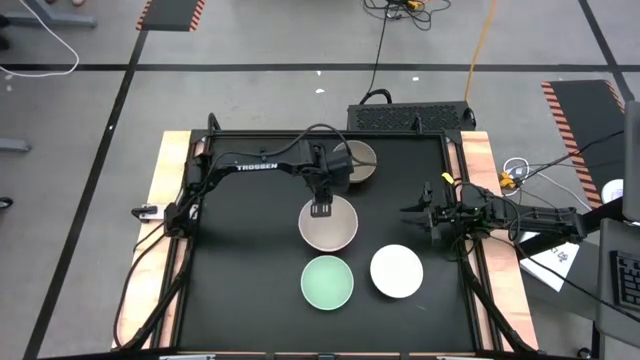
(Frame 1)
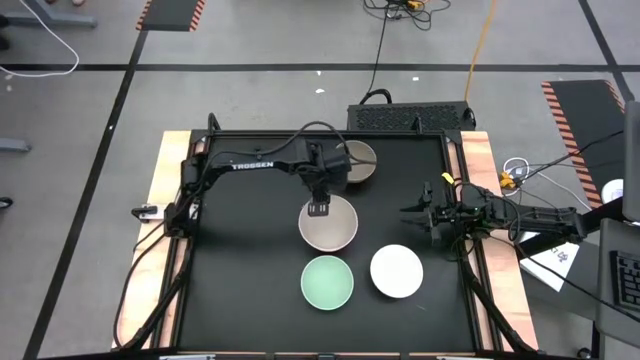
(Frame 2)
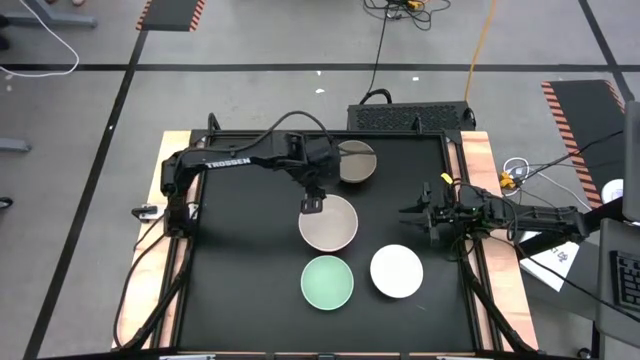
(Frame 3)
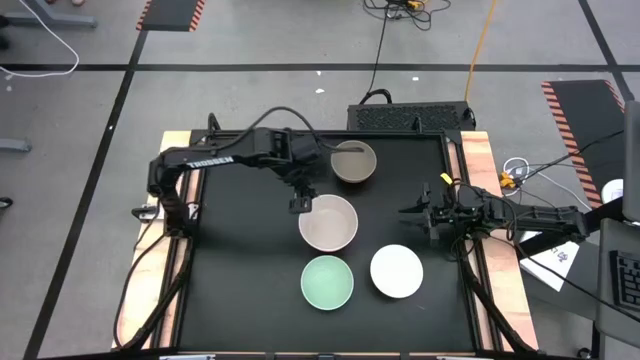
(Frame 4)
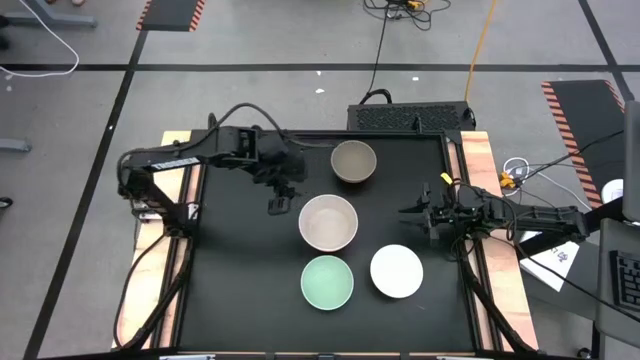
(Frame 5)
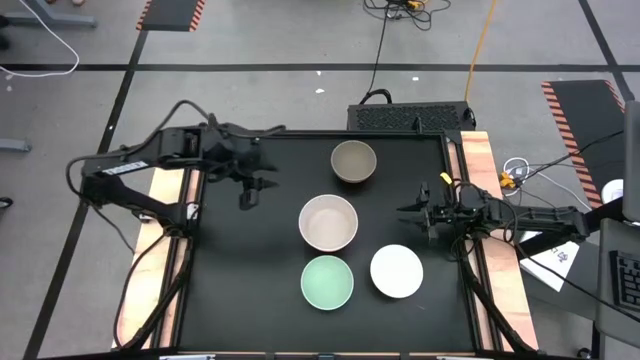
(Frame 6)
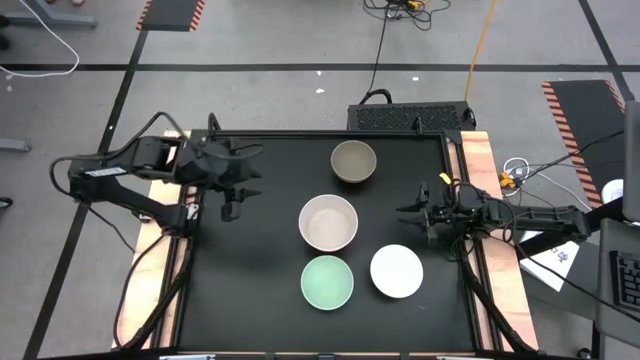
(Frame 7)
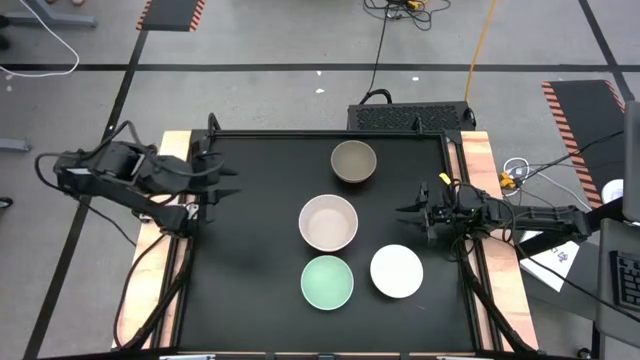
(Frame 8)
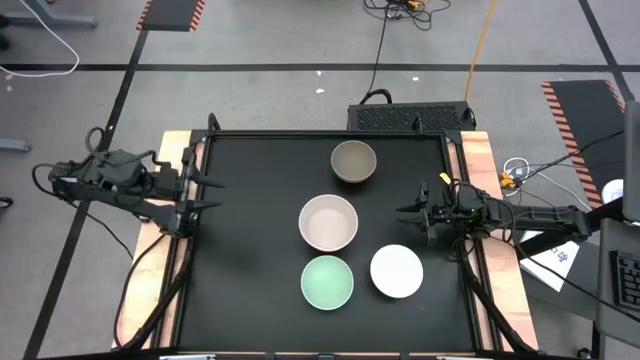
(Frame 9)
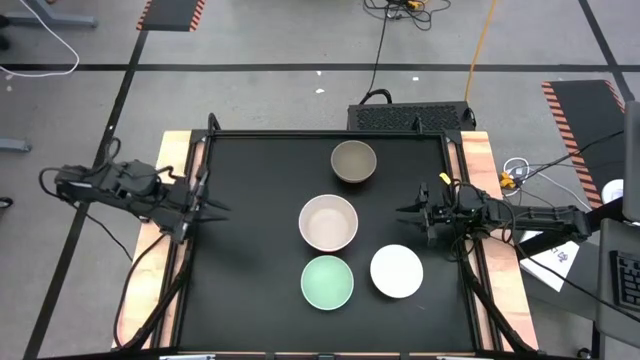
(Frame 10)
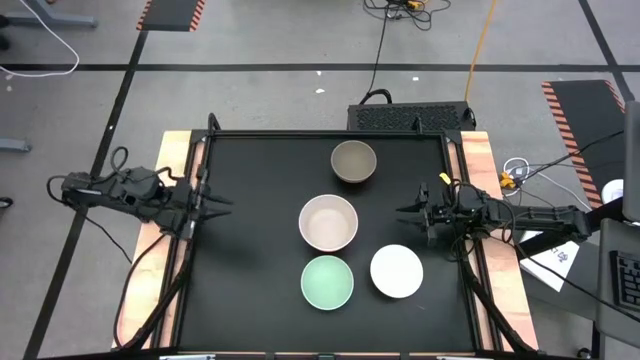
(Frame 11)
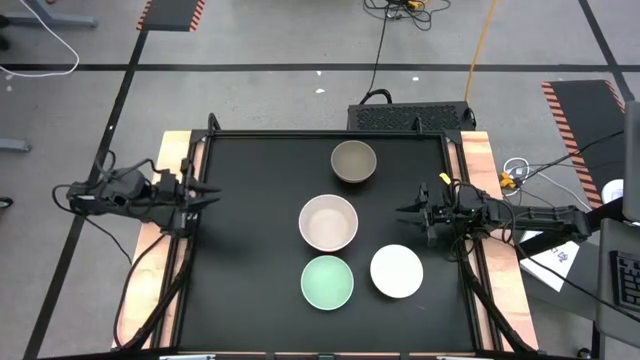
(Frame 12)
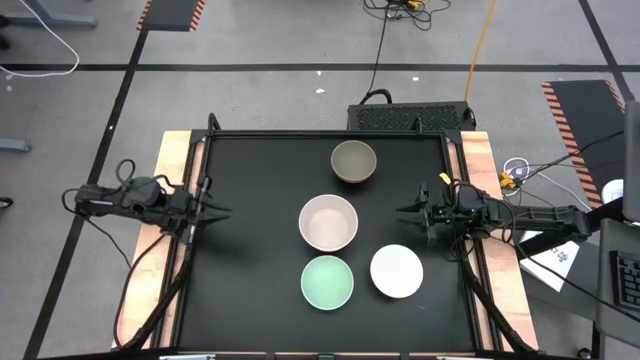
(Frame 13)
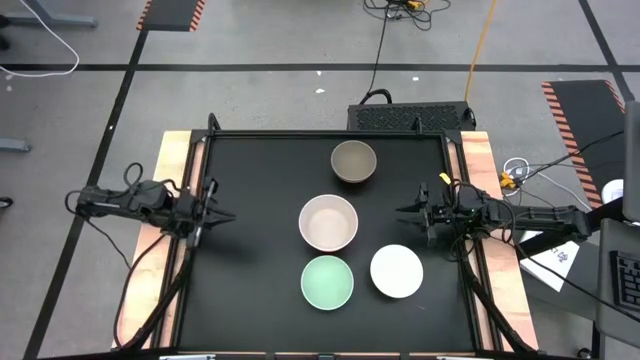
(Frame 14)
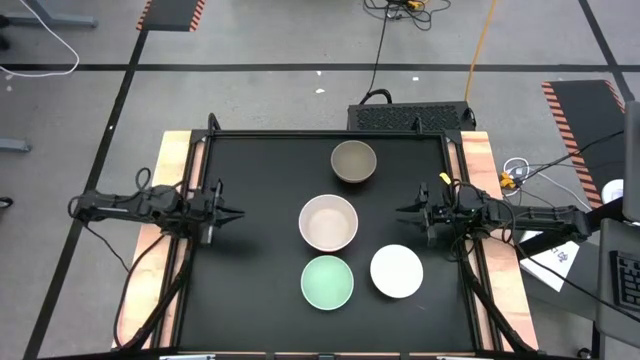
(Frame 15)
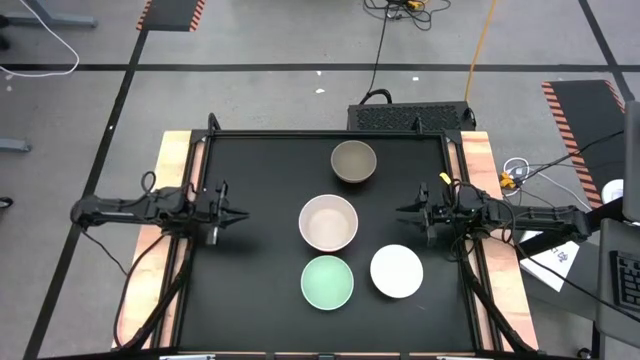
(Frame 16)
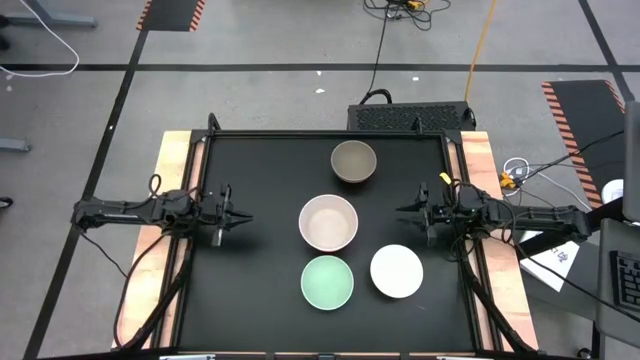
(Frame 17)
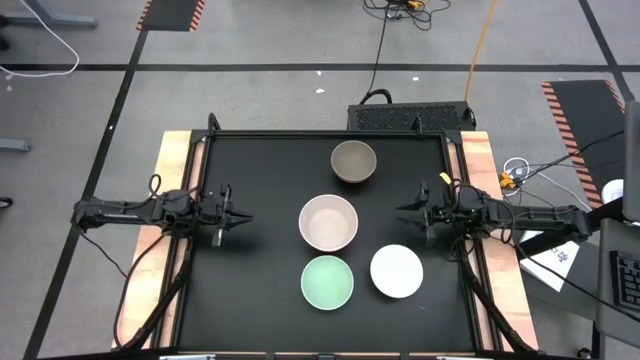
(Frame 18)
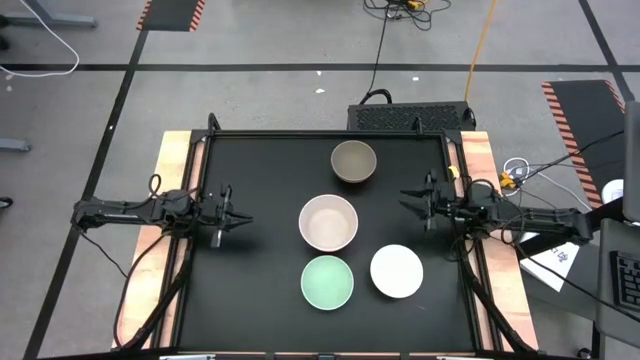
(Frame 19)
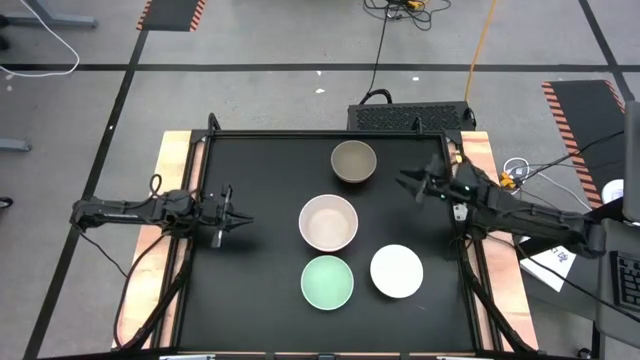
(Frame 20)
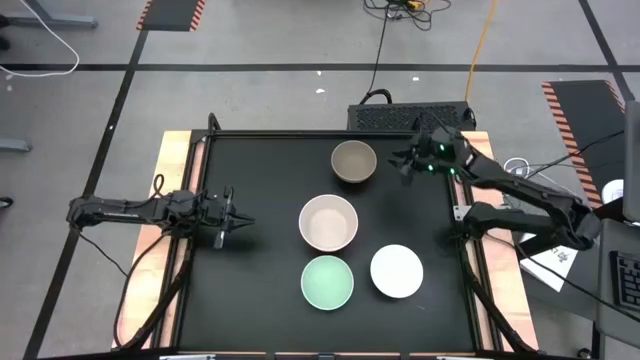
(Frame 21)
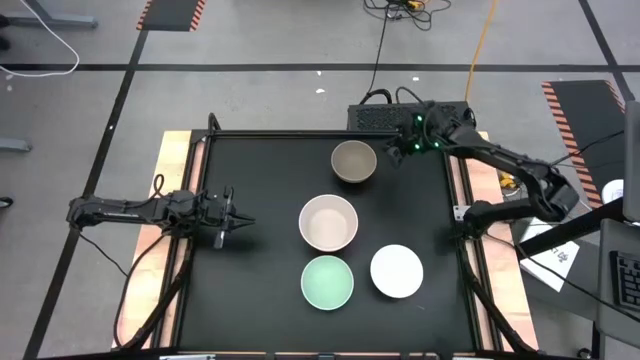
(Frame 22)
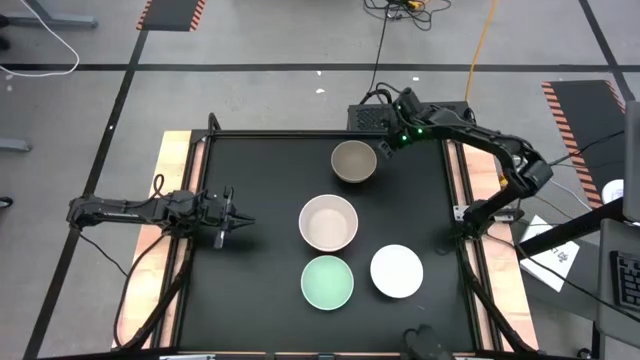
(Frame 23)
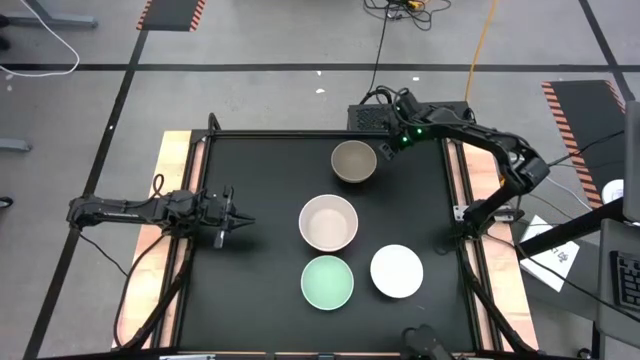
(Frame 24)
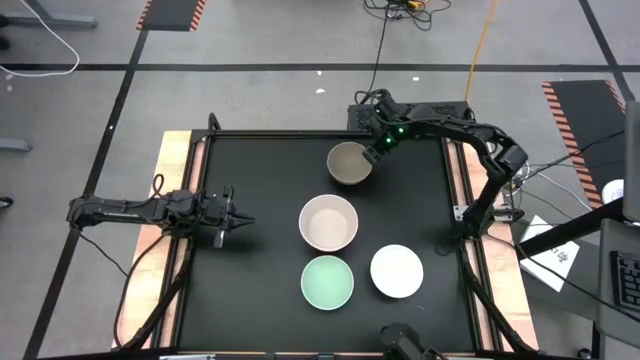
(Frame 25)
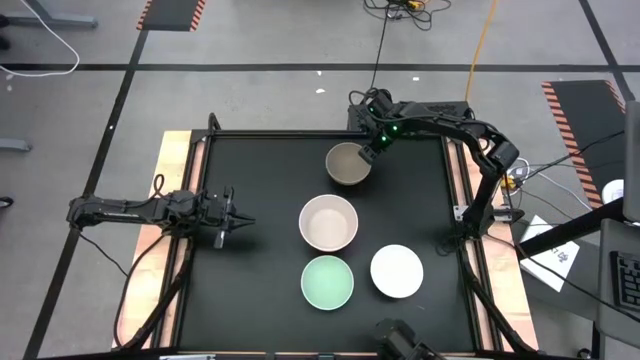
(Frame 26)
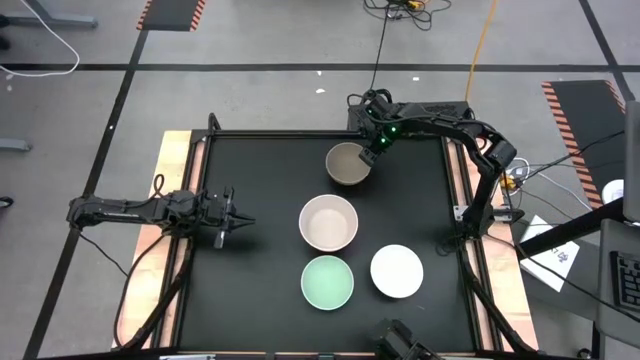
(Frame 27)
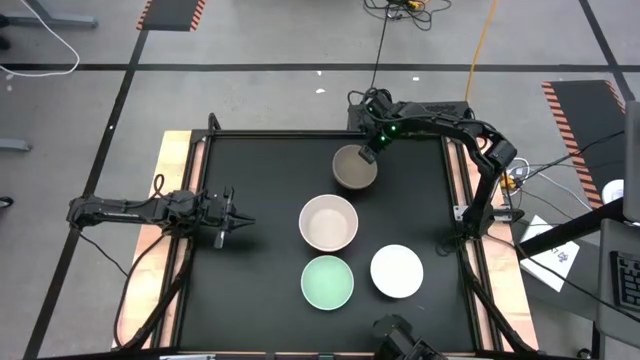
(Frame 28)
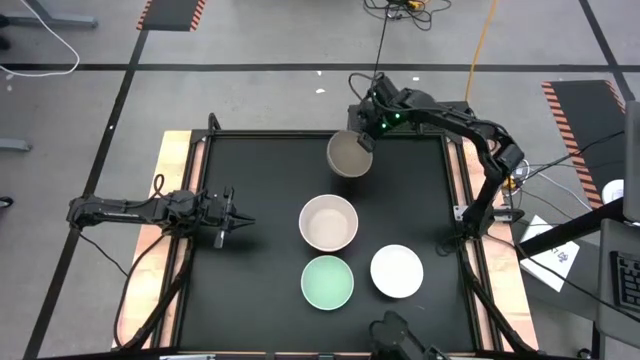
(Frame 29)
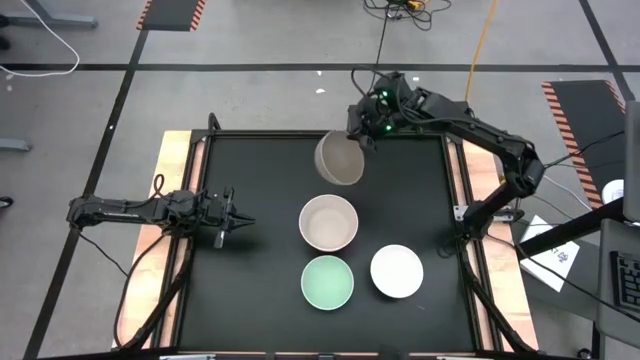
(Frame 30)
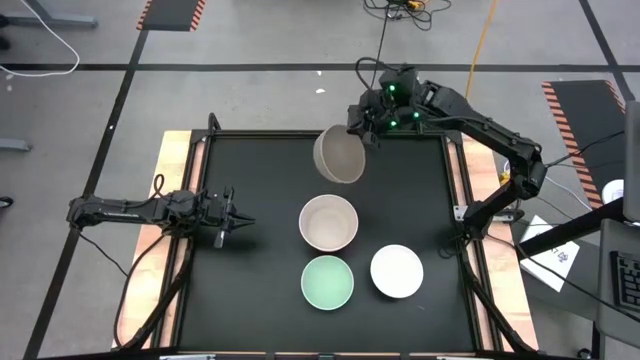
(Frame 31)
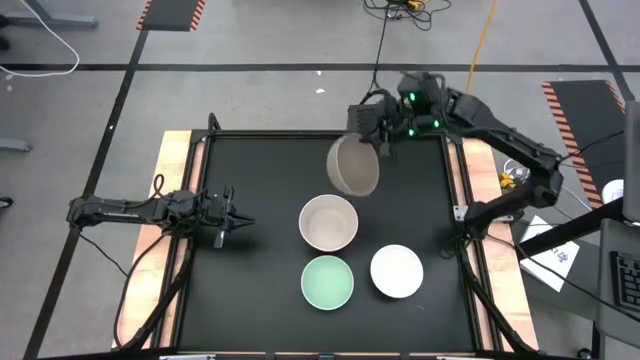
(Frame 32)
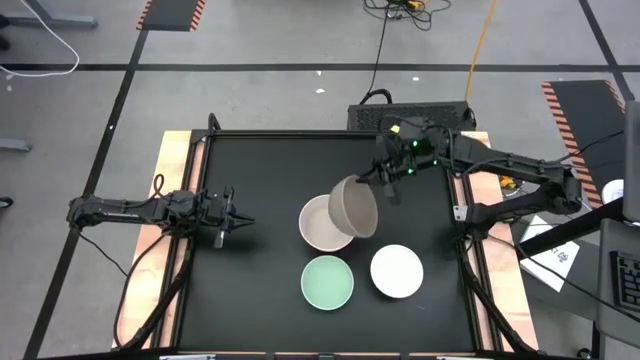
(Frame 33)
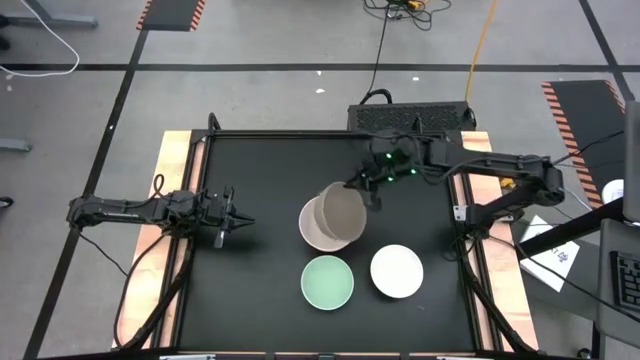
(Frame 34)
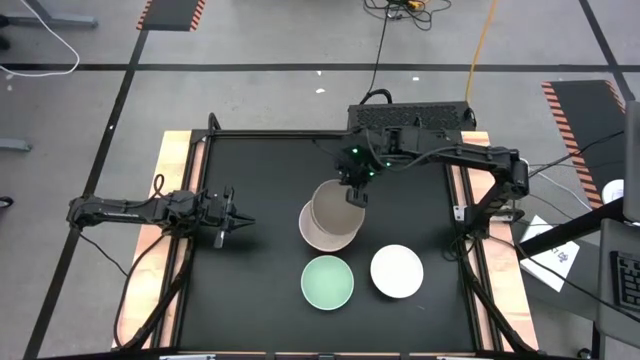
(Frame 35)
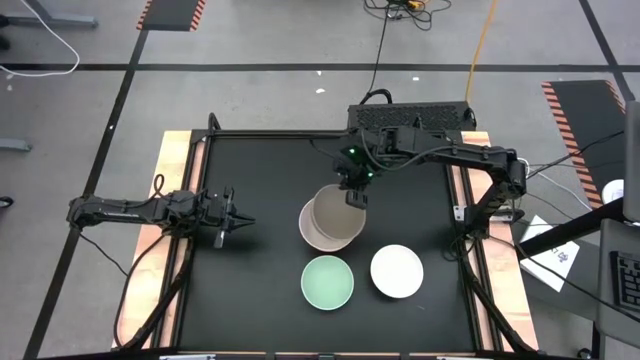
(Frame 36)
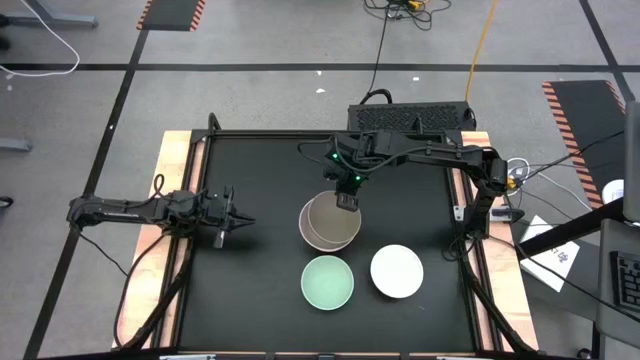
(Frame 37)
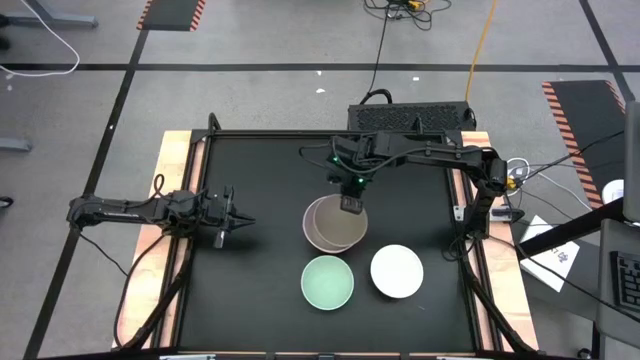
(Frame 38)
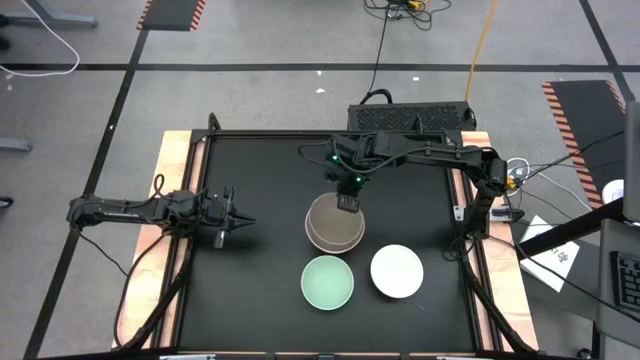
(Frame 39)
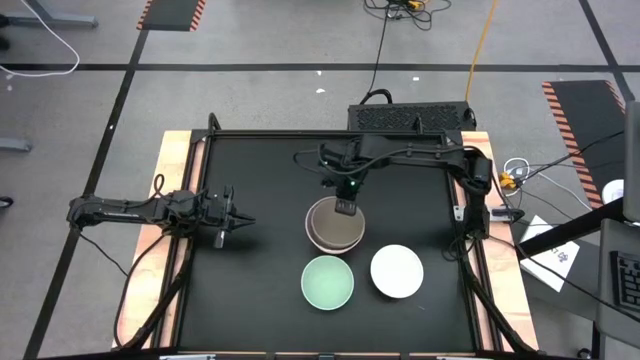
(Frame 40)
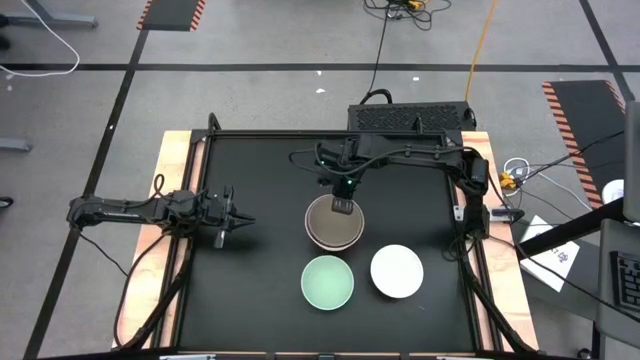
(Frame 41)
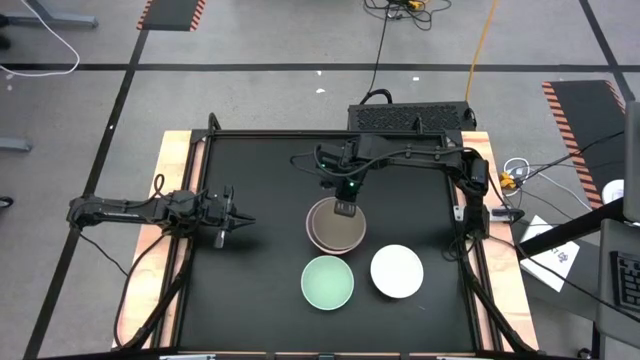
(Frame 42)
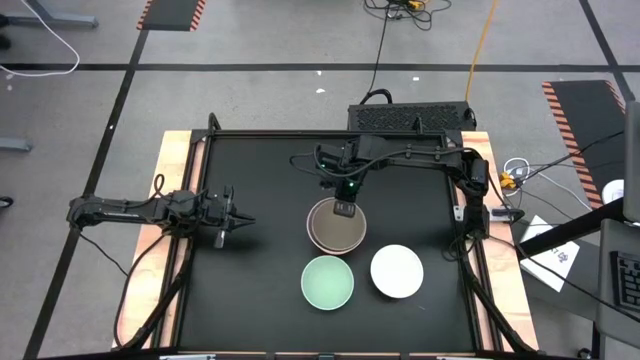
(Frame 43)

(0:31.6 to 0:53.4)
Task: Nest bowls inside each other
Stack the dark gray bowl on the light gray bowl
